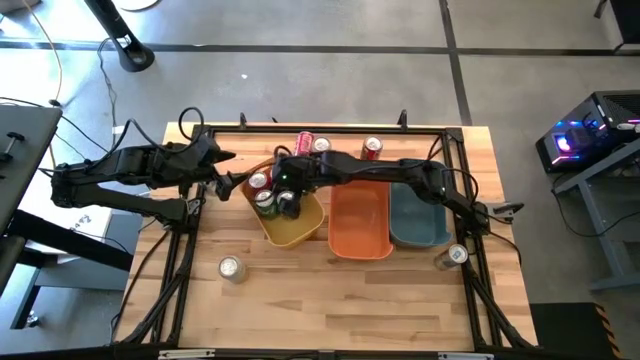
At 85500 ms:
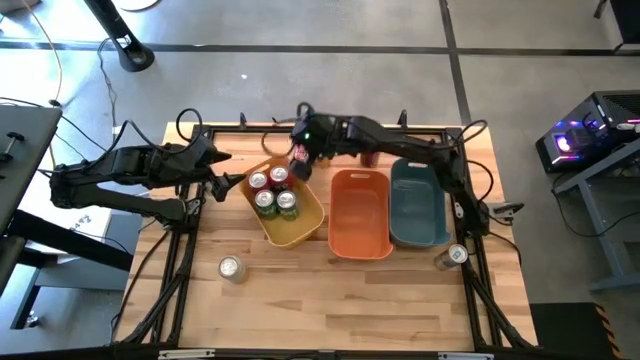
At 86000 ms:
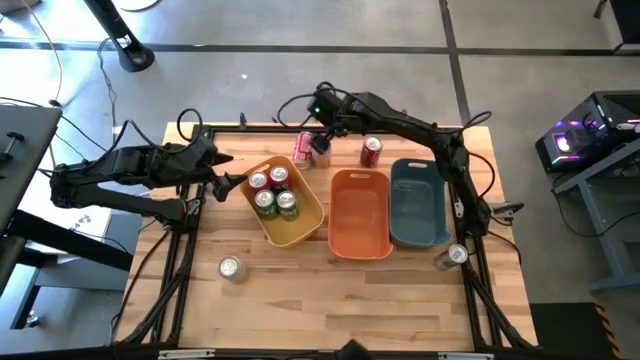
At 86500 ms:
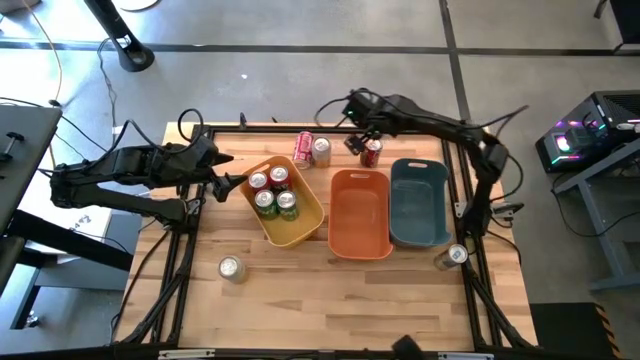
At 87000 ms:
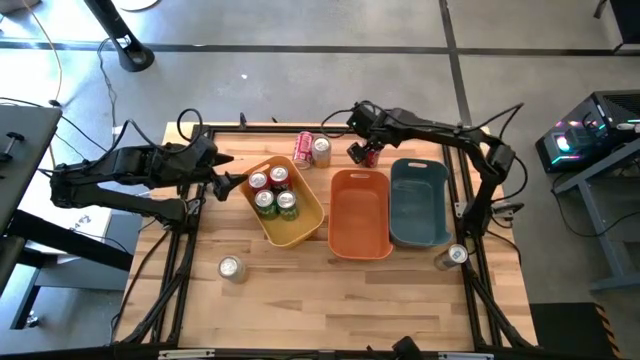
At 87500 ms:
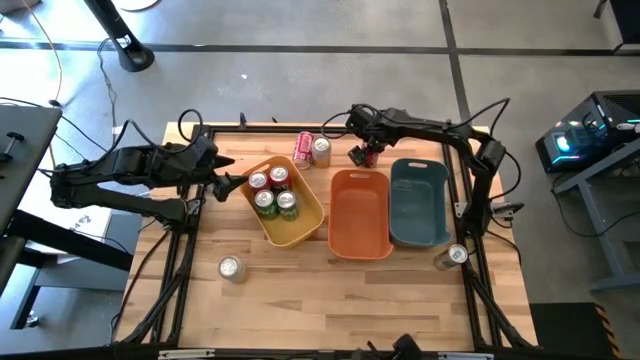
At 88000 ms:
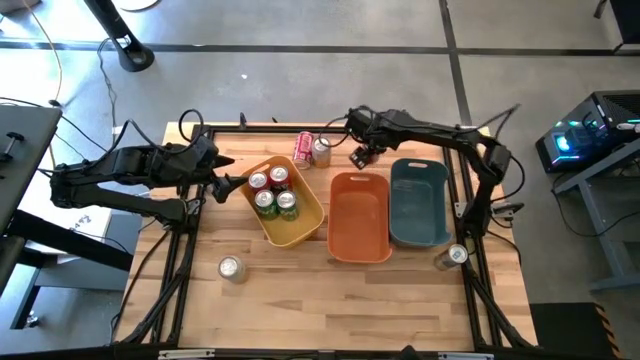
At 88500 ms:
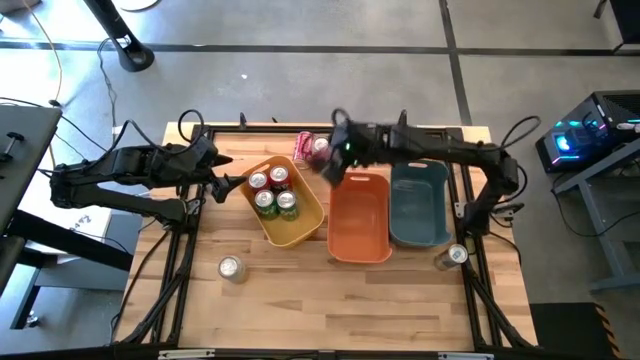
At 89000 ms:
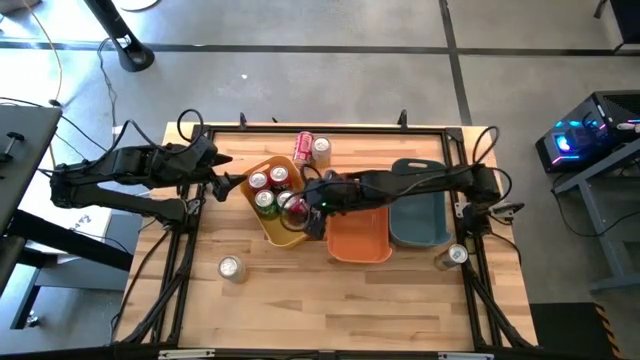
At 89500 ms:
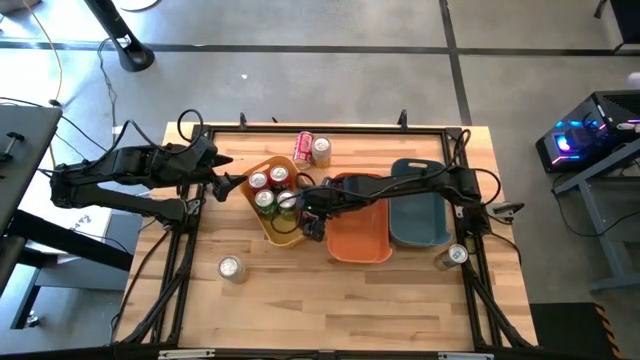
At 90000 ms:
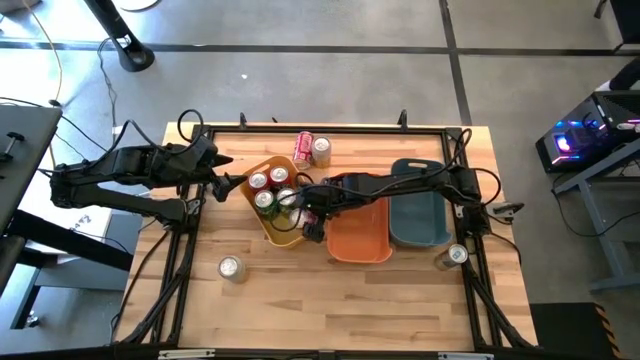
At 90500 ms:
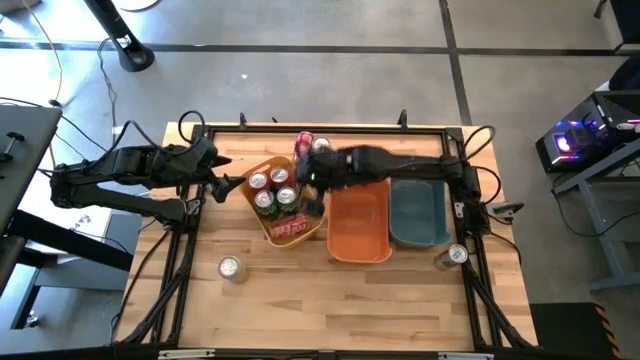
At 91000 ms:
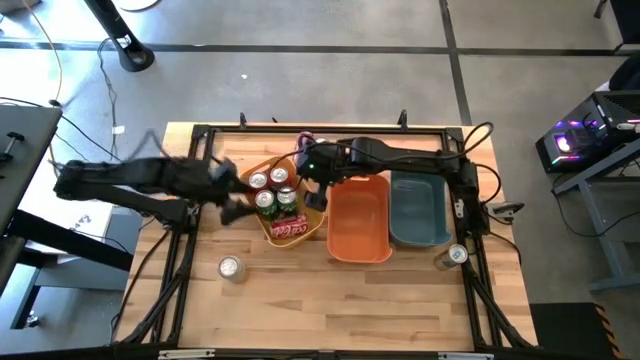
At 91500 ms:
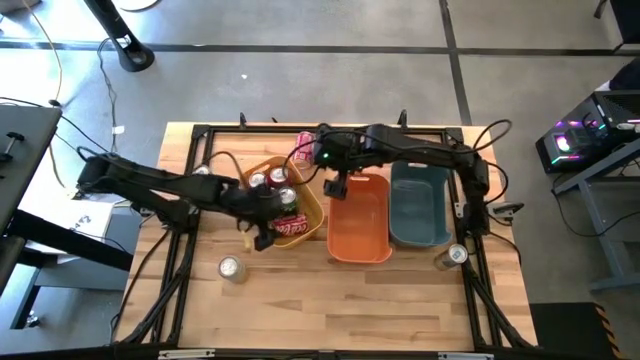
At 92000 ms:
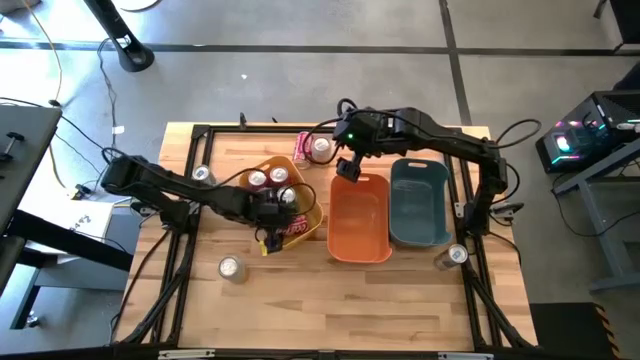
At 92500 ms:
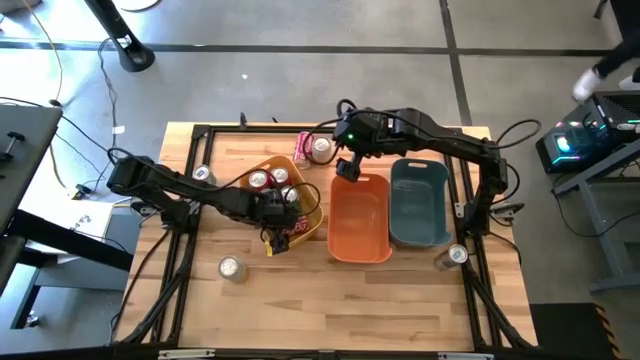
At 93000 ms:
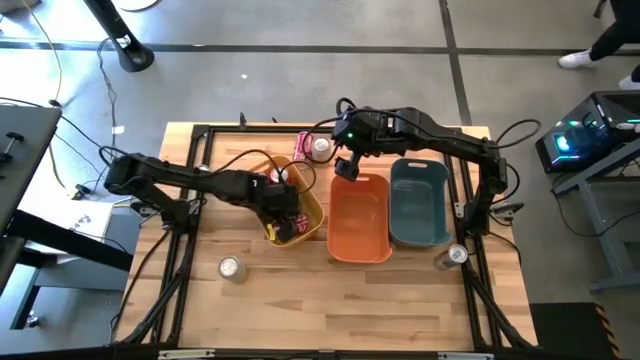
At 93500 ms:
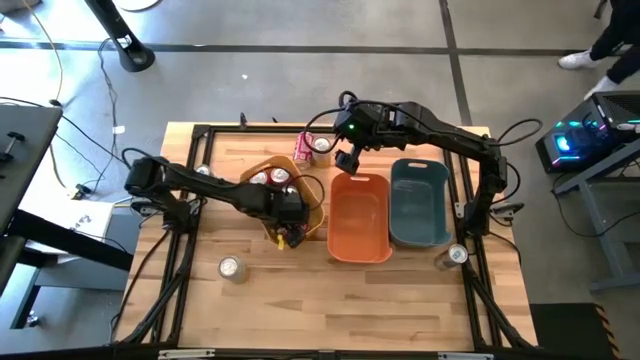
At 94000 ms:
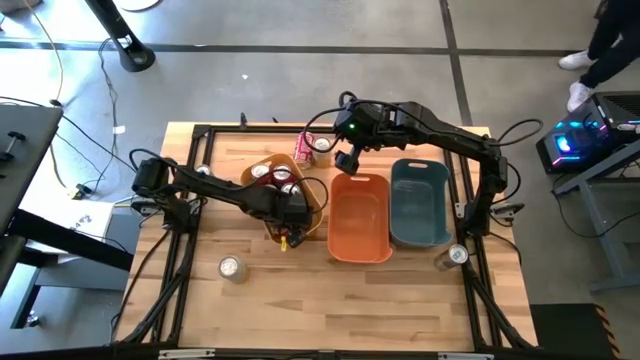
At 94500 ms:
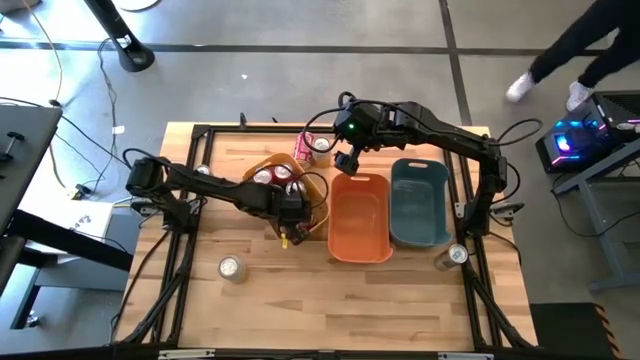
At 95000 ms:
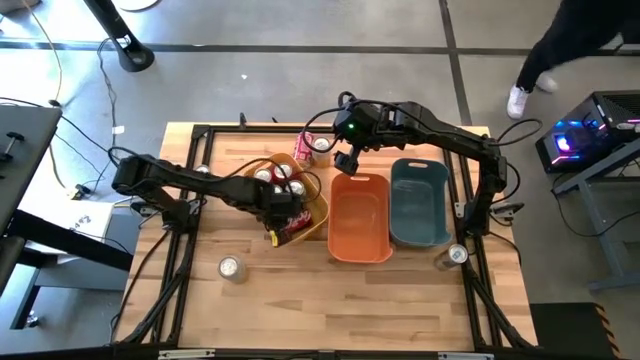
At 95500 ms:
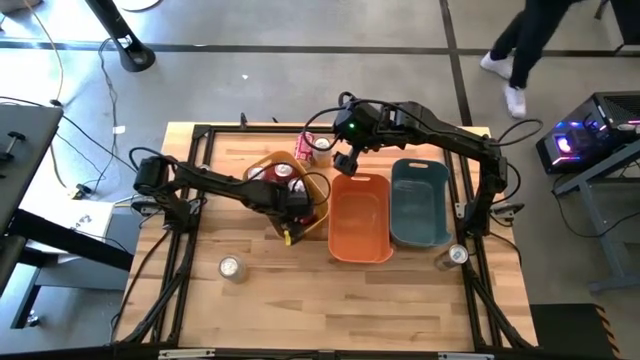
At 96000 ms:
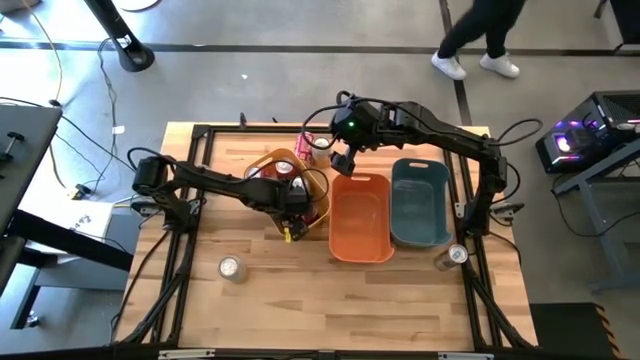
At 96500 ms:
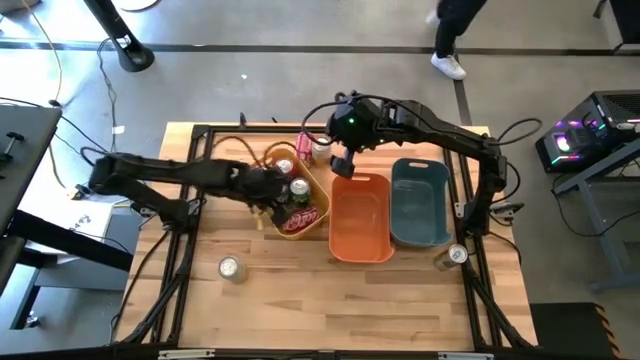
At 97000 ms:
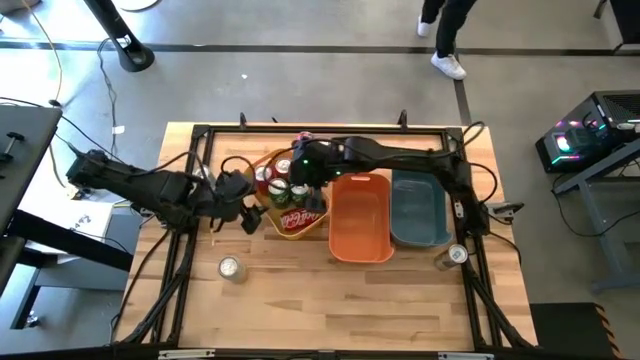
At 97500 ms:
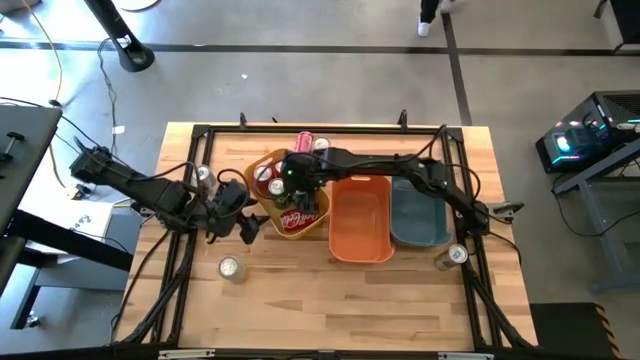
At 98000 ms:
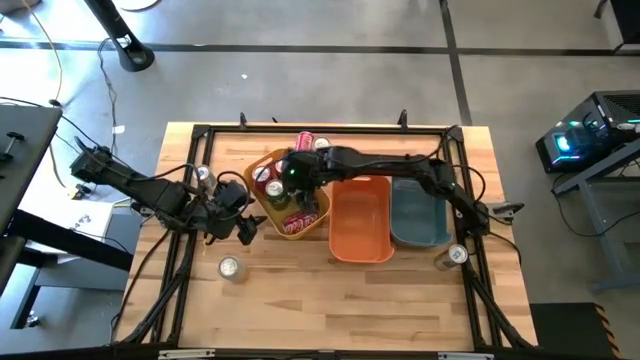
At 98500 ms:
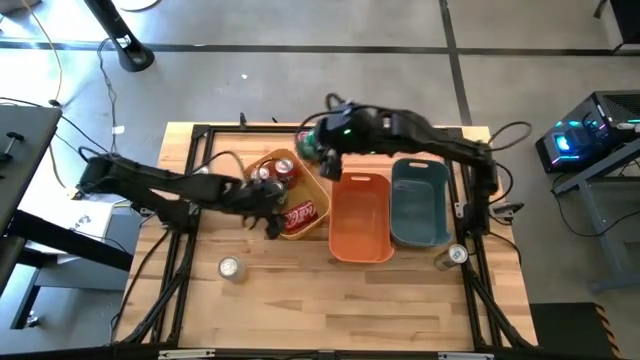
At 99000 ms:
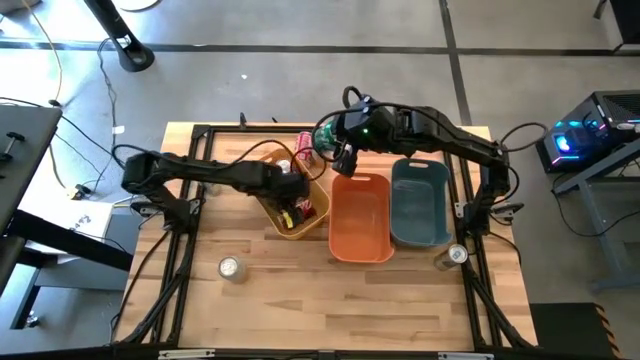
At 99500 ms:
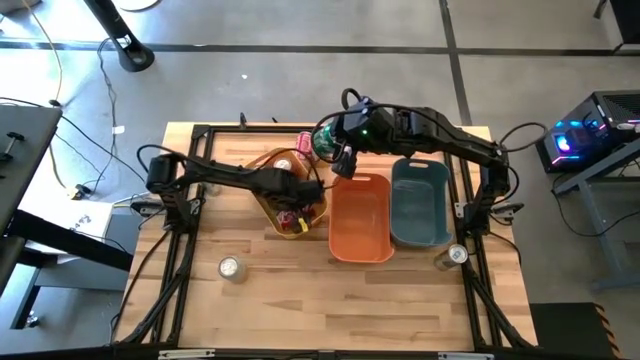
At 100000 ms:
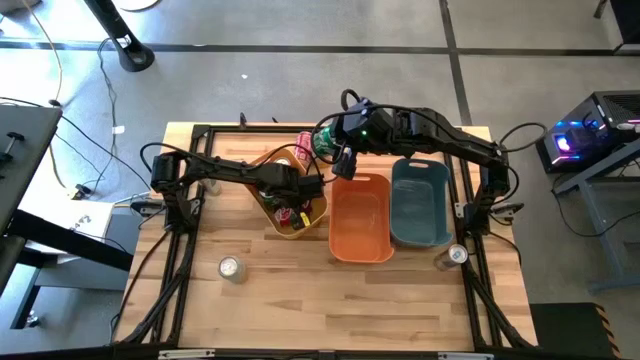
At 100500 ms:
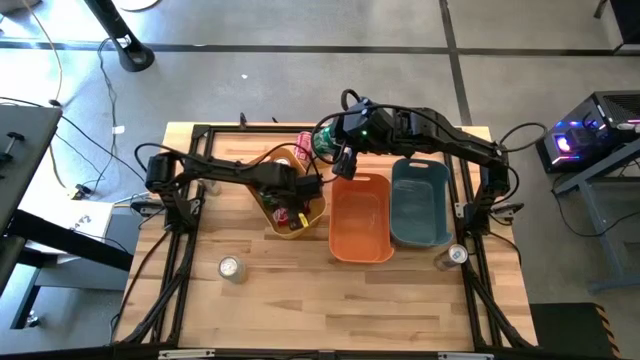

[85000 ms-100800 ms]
Task: Sort soda cans
Put the right red-white soda can into the yellow bin

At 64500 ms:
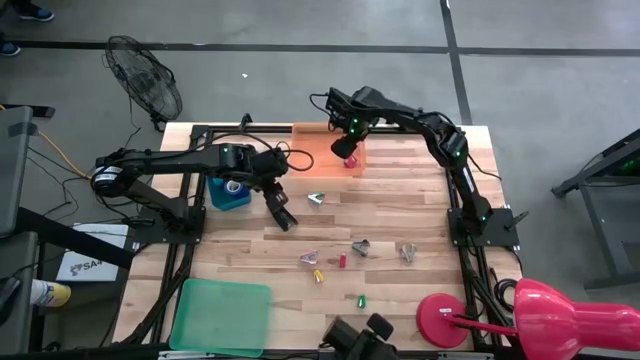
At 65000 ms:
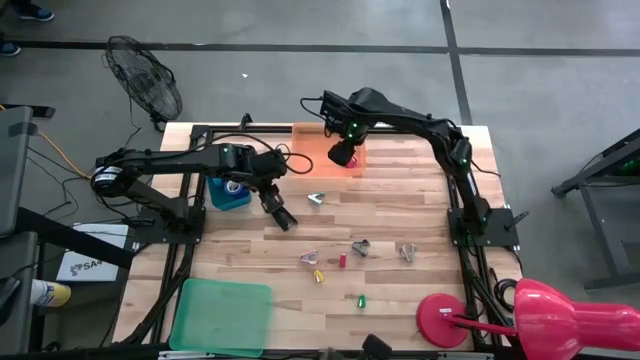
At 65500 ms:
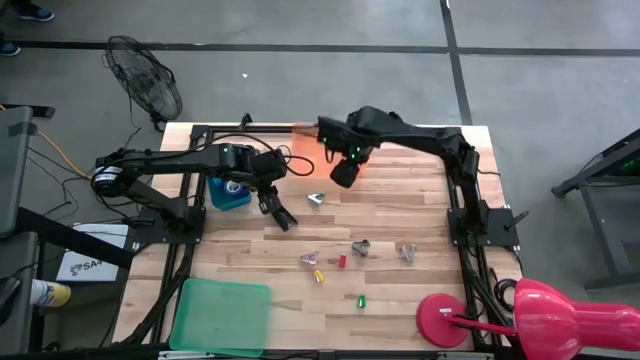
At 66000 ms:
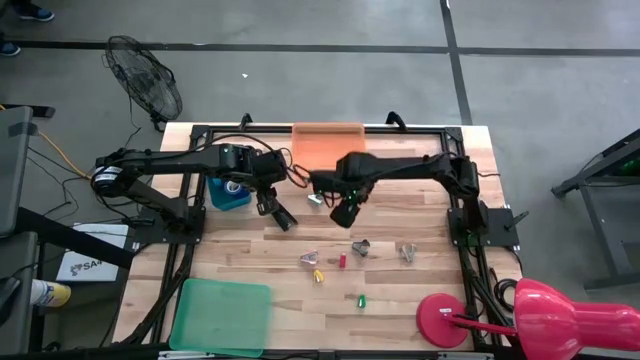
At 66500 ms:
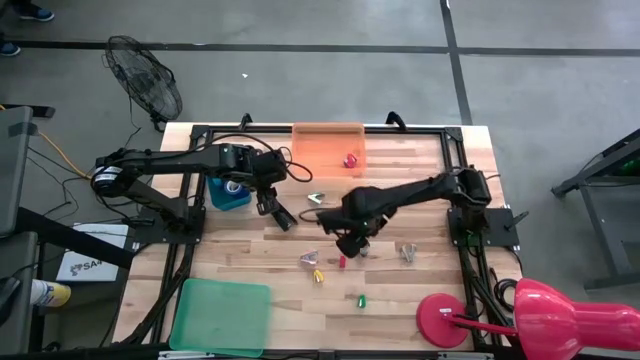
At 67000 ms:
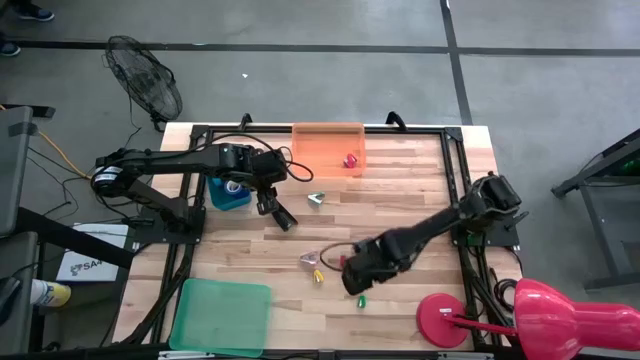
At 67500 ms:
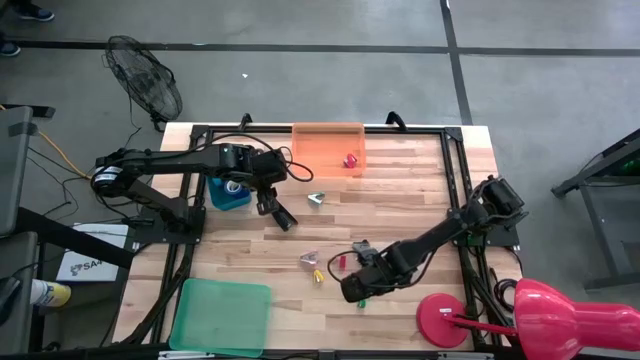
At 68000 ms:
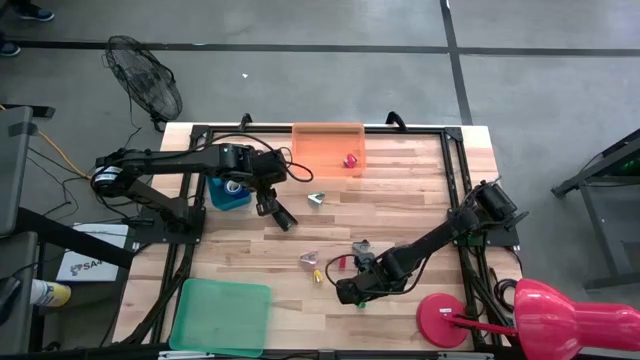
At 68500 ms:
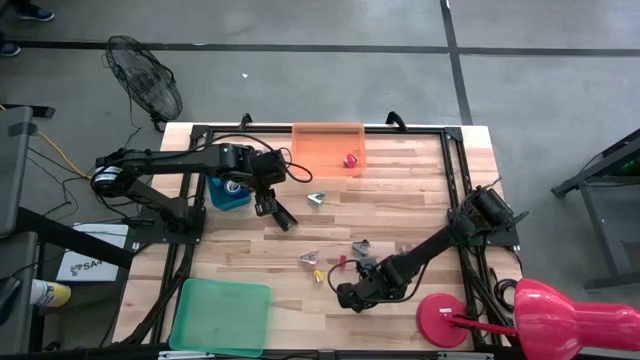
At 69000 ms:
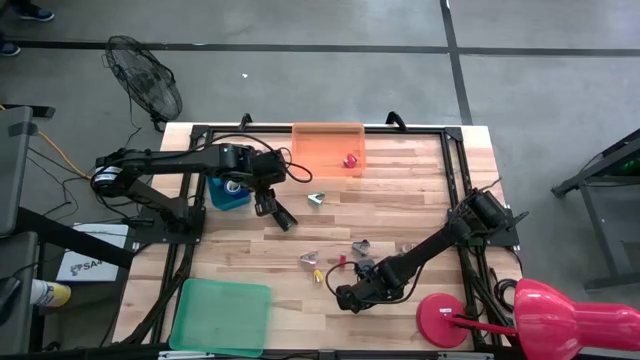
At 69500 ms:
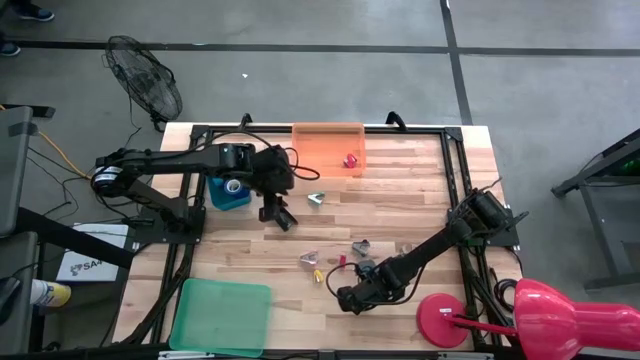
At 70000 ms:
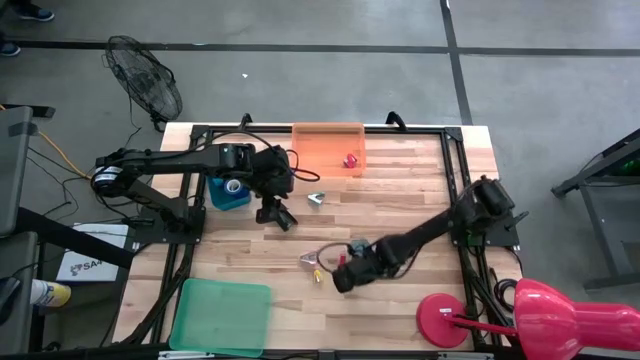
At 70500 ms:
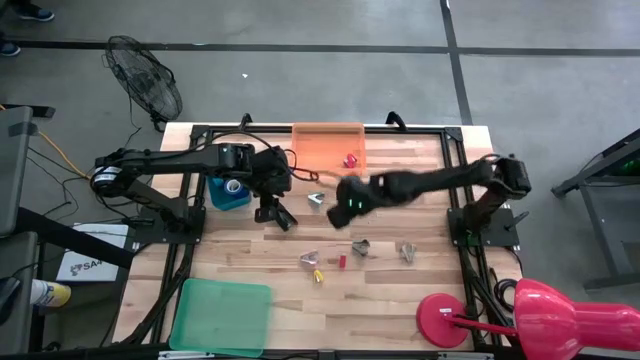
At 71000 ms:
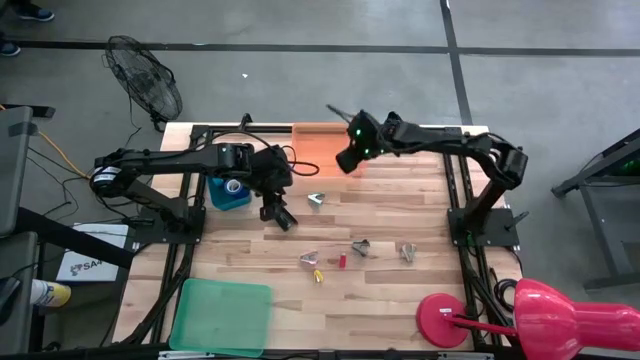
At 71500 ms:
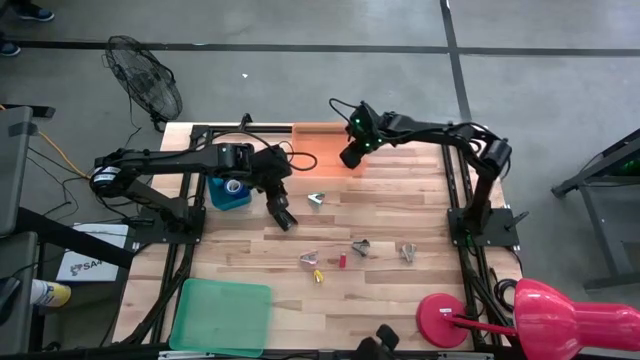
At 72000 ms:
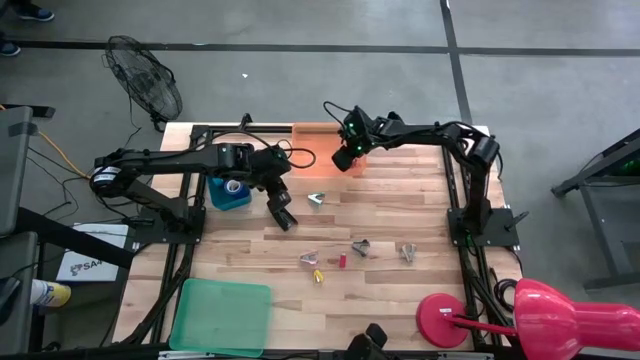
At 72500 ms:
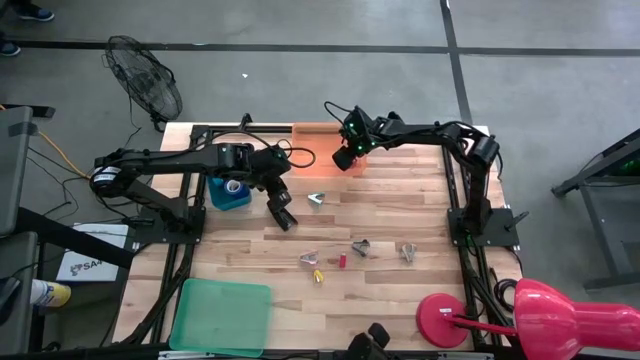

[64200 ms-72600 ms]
Task: Pick and place Stapler, Stapler remover, tape
Put the green stapler into the orange bin
